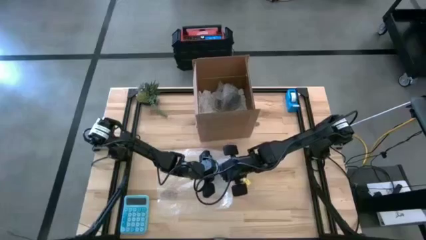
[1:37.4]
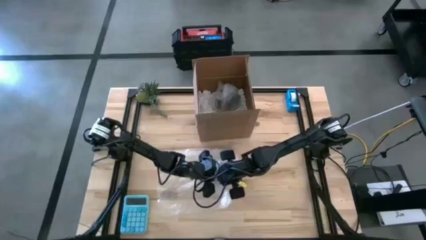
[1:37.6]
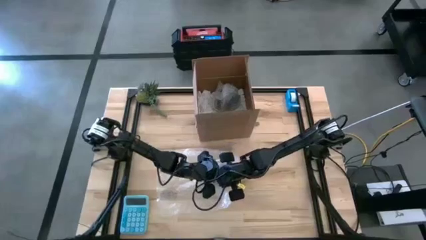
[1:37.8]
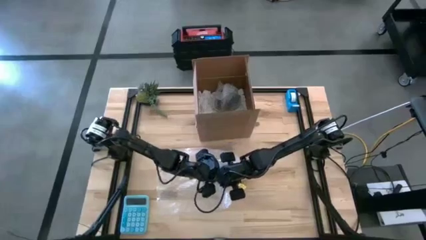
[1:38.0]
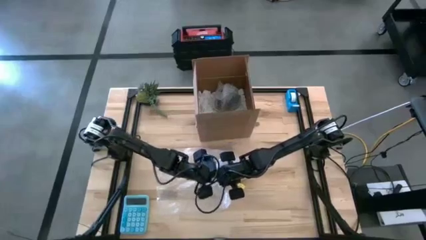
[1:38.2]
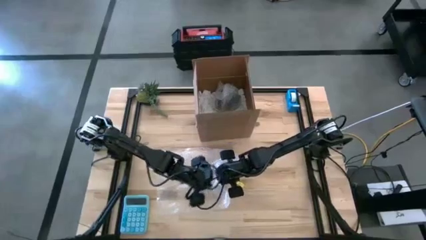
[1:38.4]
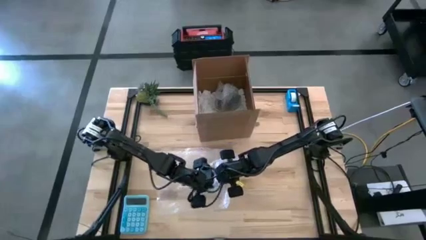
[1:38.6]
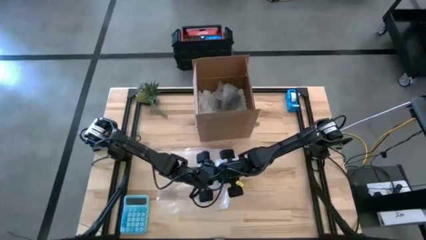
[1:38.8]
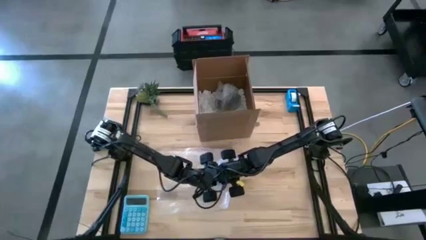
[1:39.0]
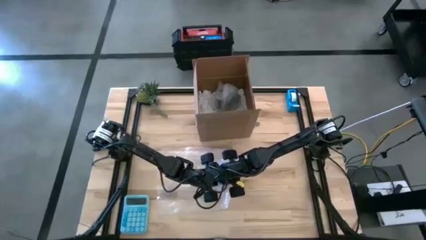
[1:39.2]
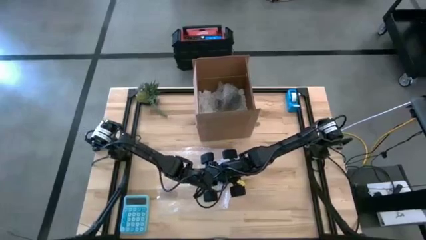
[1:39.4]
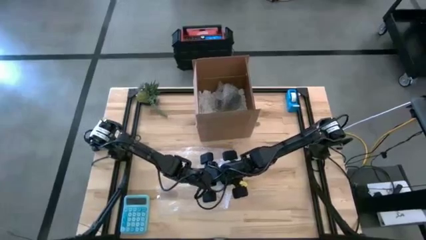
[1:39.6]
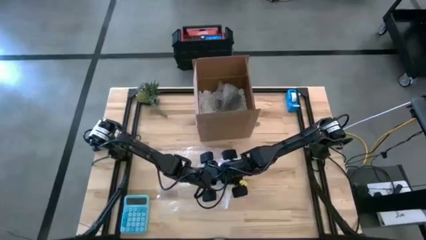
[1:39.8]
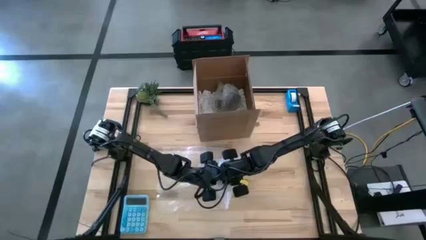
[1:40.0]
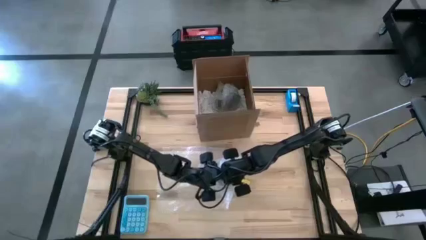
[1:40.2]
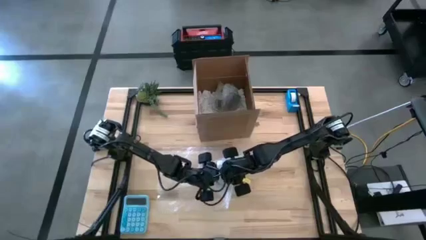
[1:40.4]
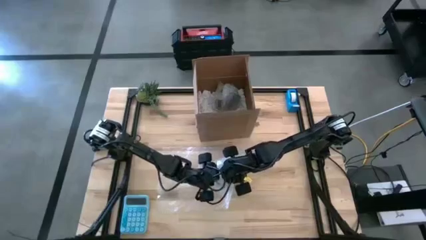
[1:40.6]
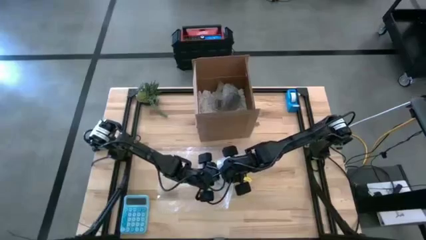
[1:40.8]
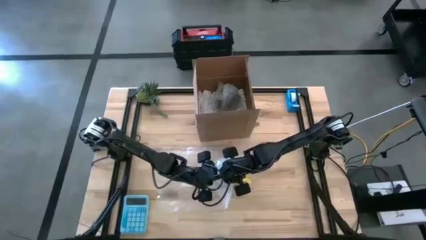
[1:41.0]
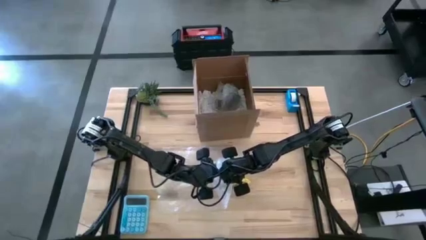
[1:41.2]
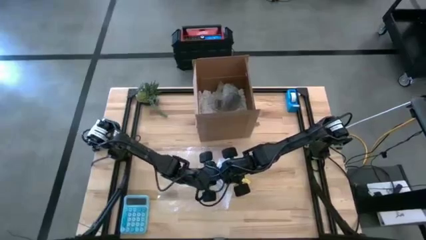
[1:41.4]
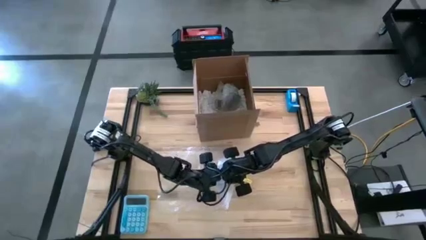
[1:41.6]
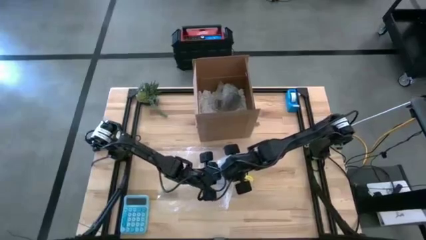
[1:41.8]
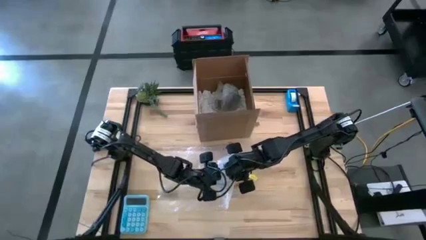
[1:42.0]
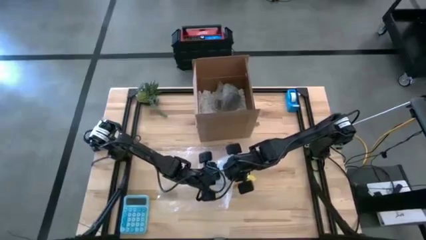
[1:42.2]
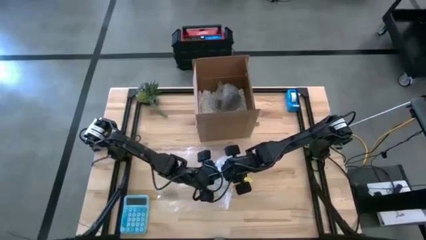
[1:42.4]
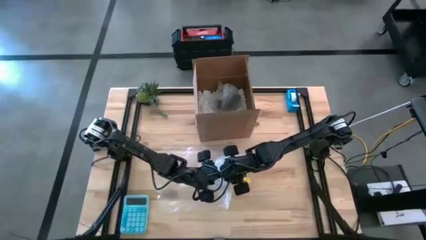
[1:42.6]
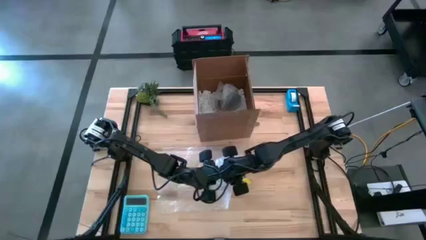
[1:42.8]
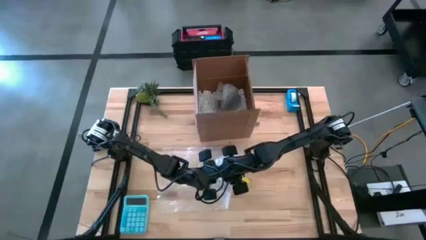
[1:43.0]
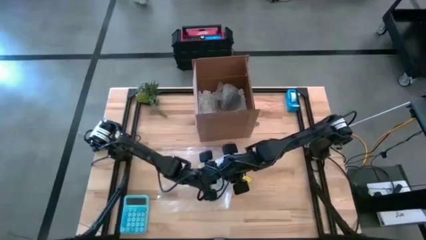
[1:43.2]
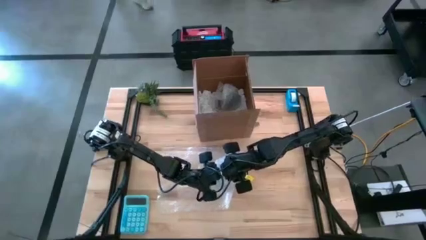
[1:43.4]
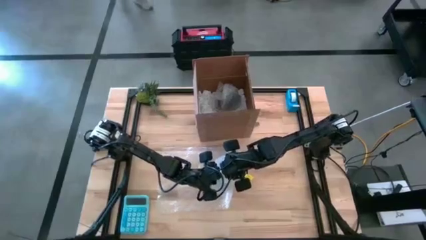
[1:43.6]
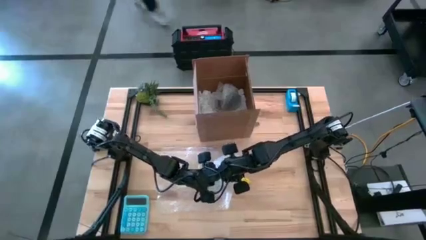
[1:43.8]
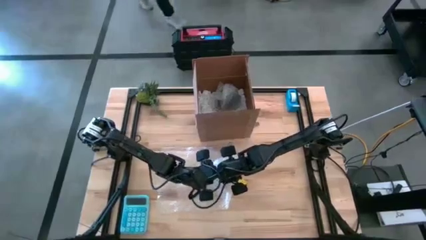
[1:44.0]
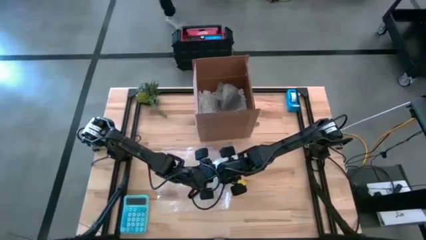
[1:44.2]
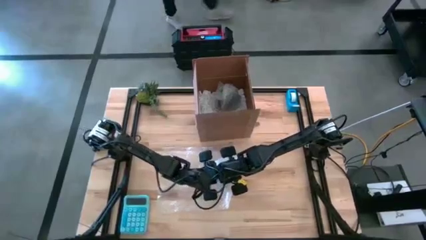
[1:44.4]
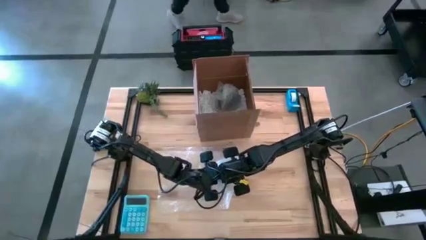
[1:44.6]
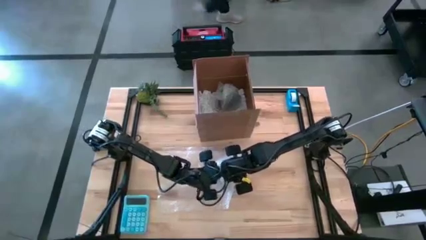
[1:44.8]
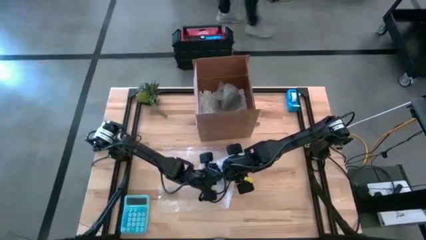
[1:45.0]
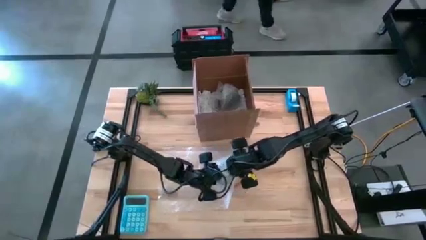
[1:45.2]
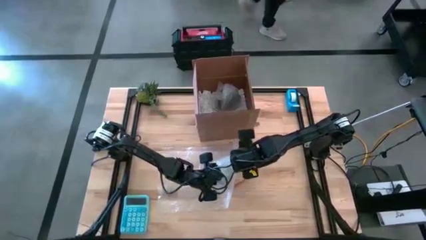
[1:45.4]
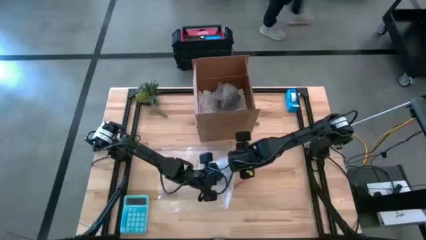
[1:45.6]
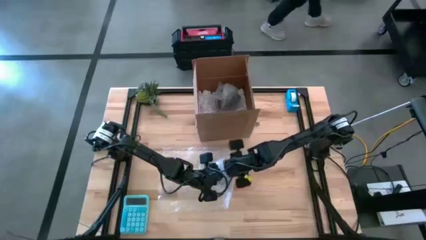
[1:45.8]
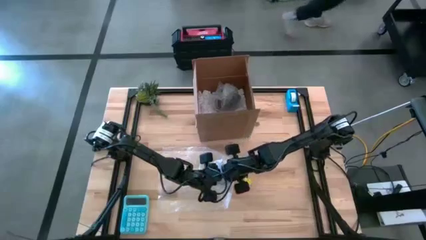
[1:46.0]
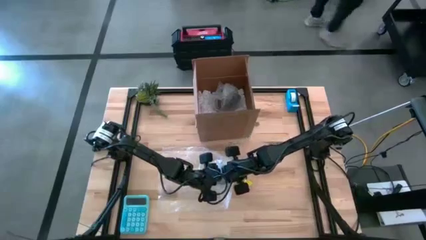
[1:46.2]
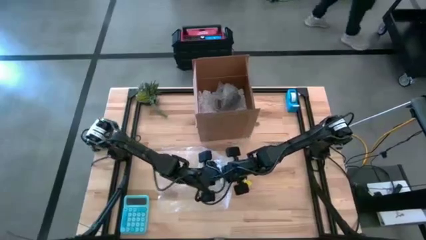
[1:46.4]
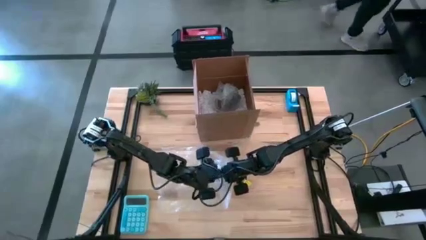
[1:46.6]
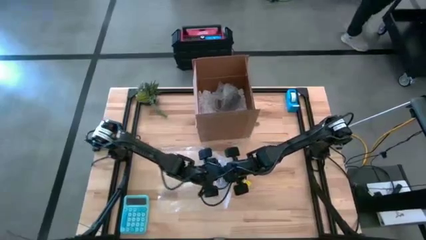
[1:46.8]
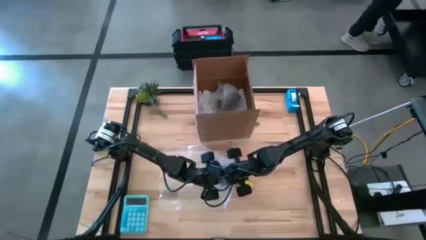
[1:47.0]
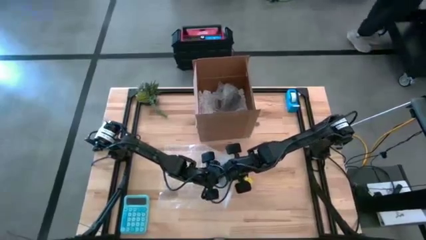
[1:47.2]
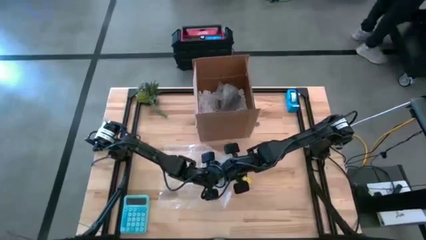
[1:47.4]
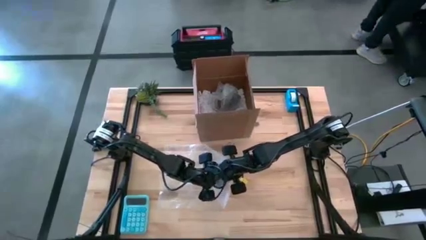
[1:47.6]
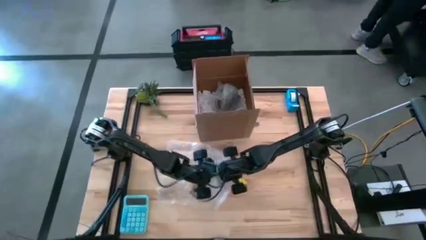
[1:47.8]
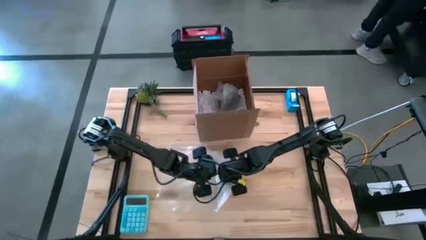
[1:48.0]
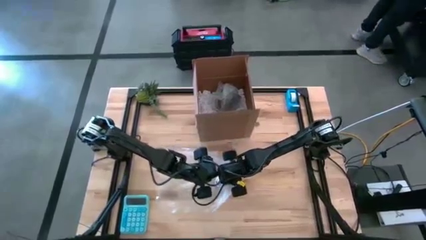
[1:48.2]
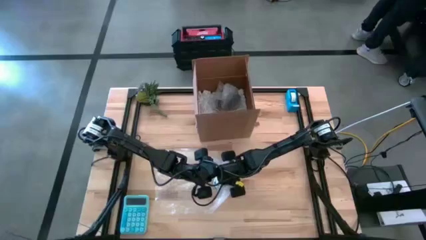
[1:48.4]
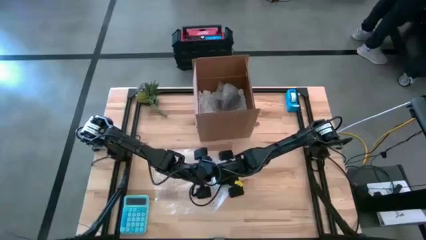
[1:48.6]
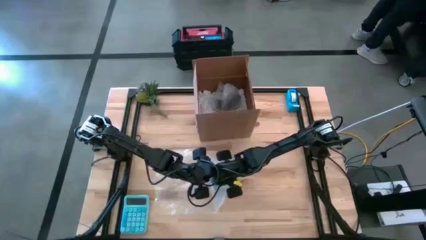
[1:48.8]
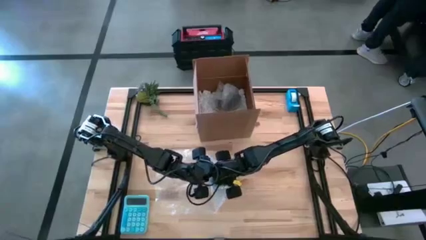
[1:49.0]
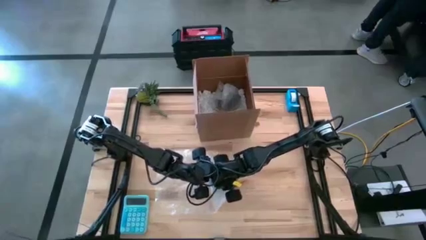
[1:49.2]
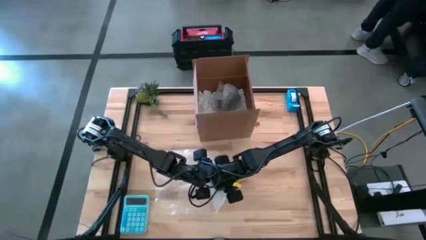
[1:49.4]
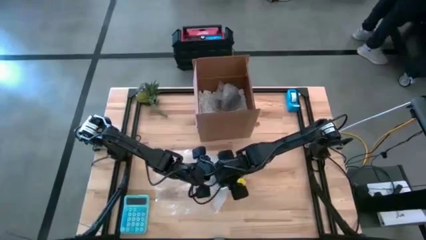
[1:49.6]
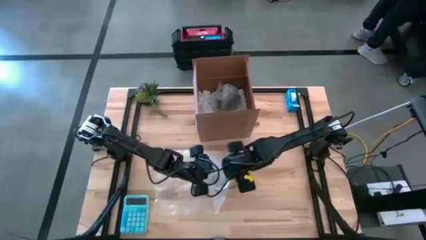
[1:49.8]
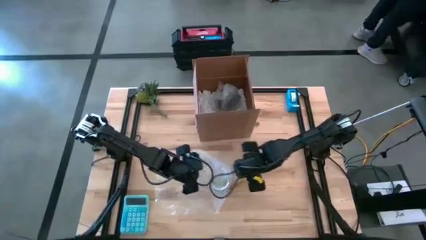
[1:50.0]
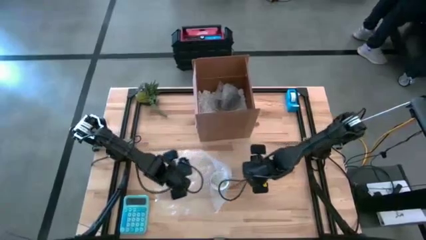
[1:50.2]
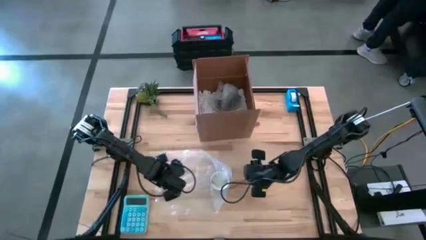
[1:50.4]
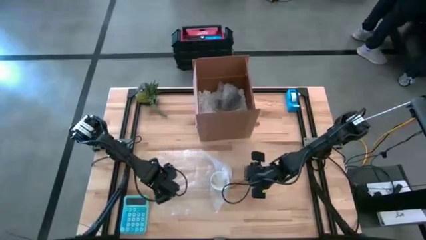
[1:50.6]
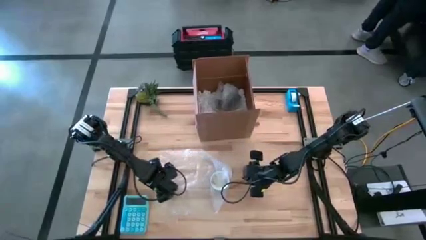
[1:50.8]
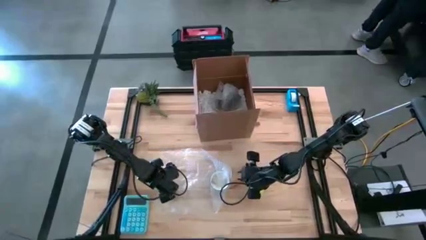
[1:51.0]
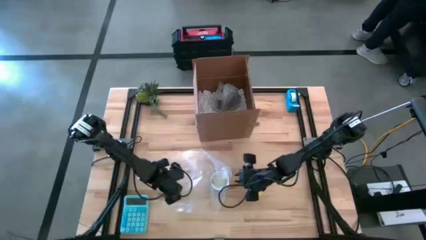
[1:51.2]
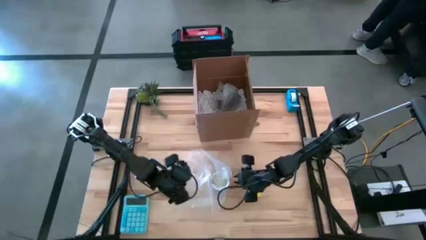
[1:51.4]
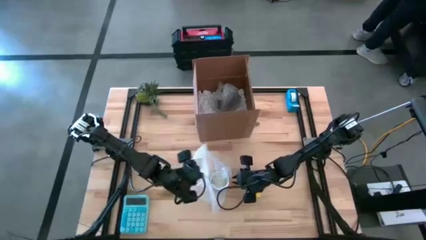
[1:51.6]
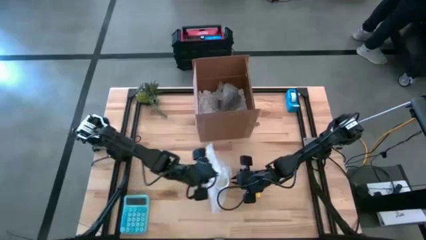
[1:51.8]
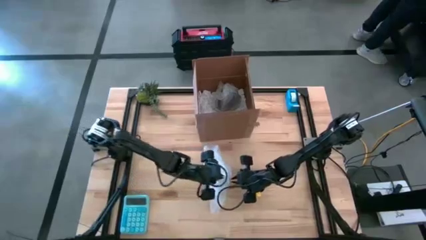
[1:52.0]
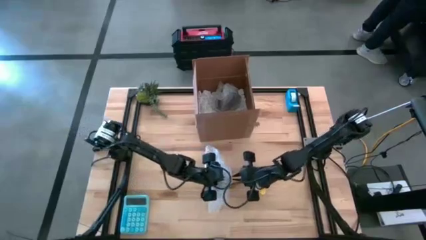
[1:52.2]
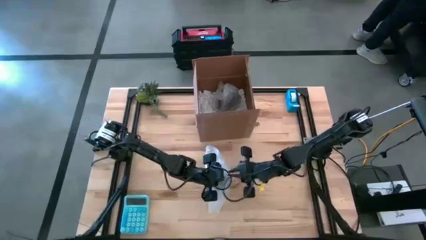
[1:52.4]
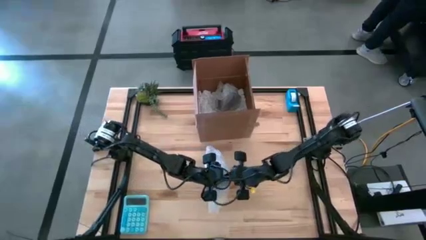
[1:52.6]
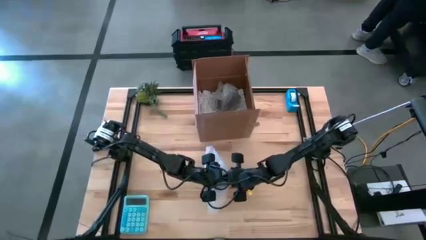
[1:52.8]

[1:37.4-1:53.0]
Task: wrap mug
Wrap the white mug with the bubble wrap

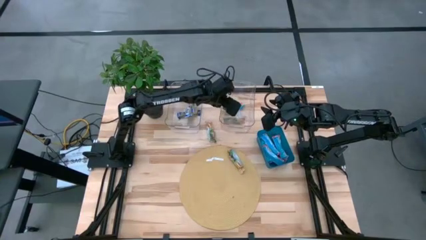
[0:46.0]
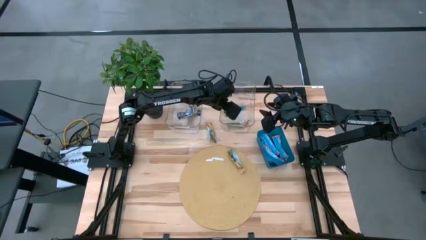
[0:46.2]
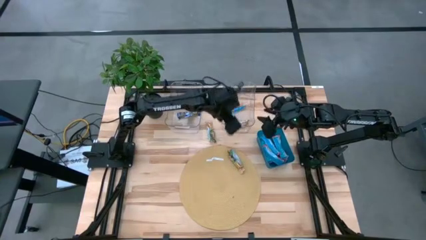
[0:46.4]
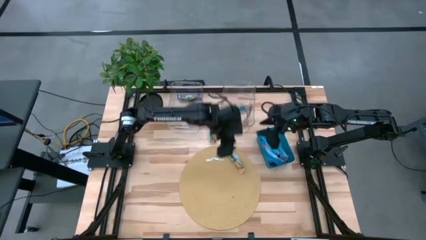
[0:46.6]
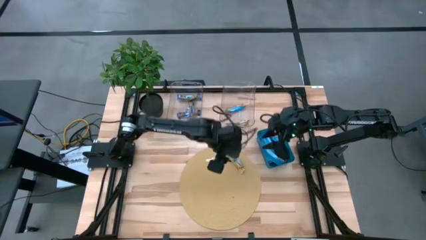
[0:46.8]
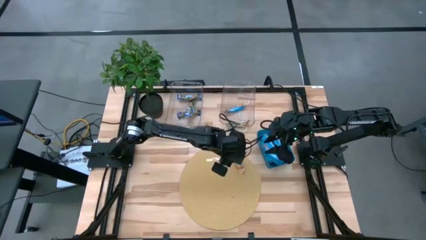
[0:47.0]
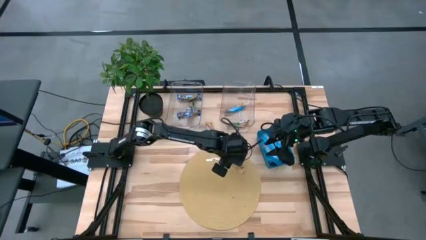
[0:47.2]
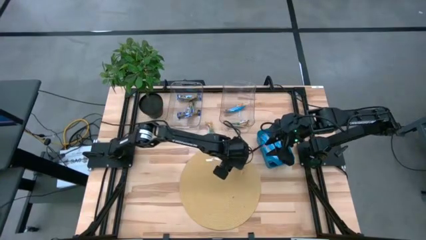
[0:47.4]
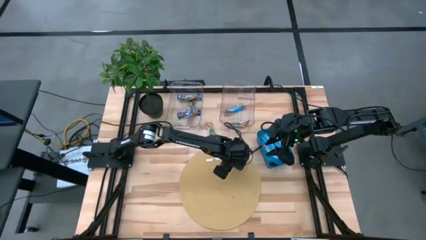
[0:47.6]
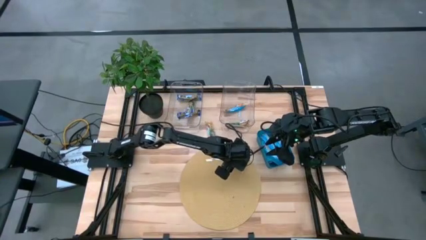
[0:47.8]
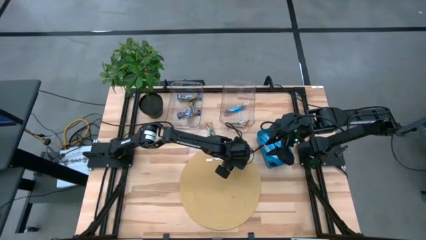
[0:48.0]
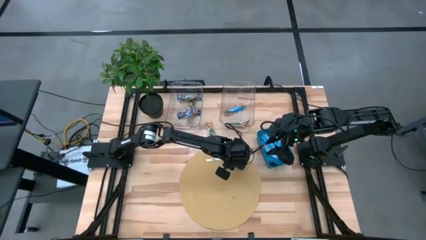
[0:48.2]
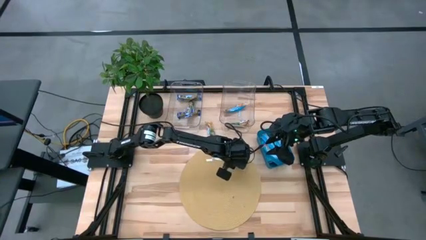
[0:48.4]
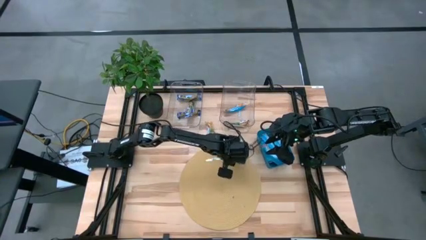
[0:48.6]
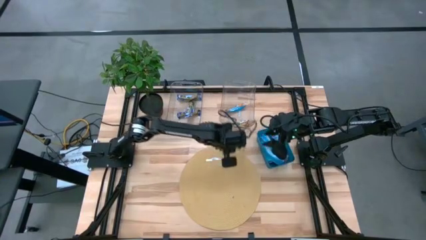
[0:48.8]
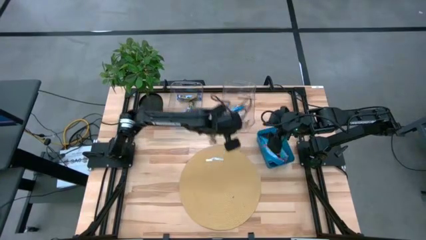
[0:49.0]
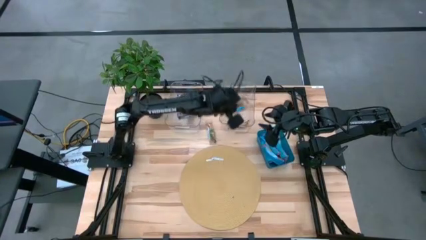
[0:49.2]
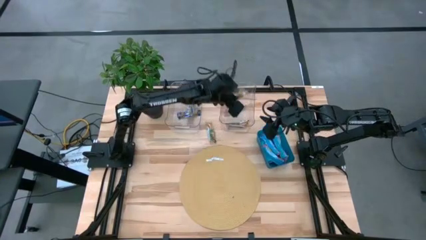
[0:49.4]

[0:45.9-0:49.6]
Task: Pick and place Granola Bars by type
Put the yellow granola bar into the right transparent bin
